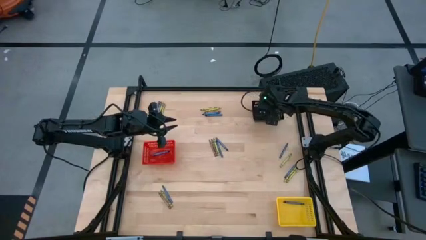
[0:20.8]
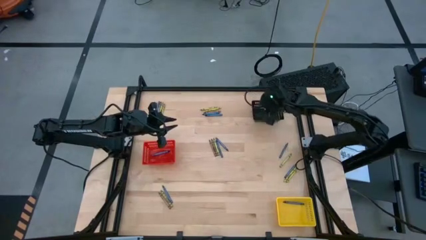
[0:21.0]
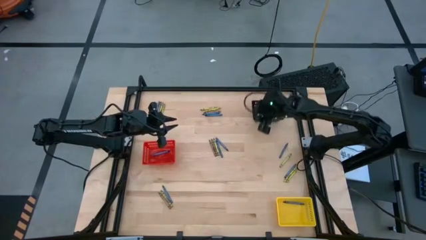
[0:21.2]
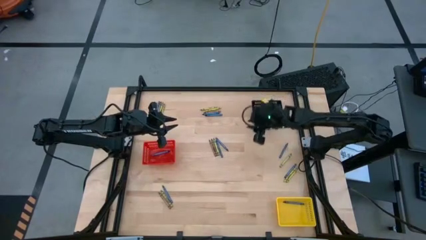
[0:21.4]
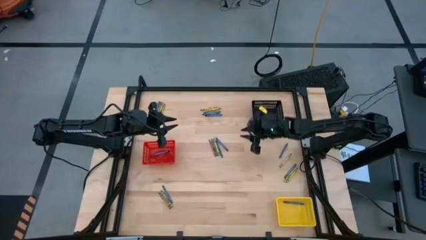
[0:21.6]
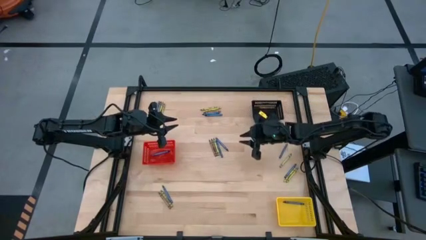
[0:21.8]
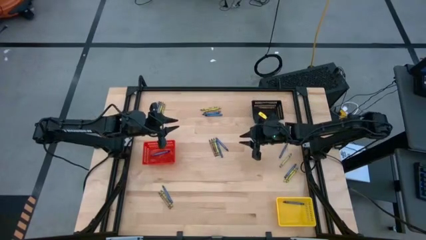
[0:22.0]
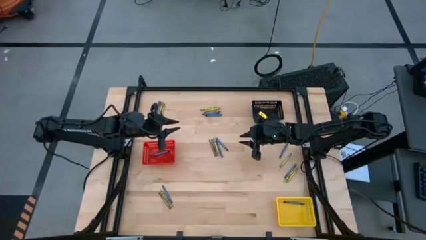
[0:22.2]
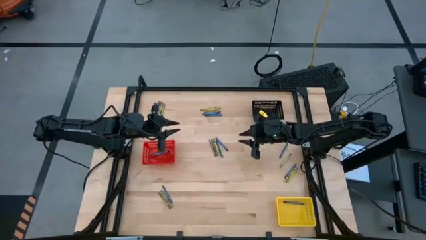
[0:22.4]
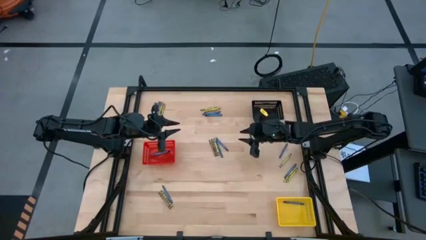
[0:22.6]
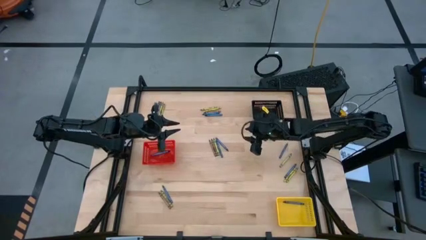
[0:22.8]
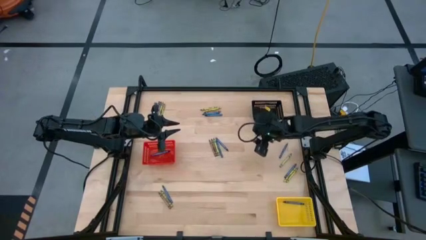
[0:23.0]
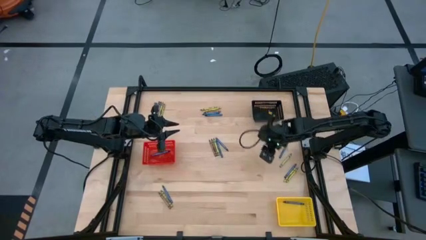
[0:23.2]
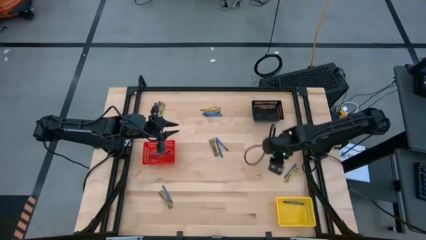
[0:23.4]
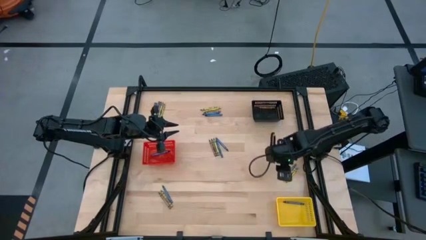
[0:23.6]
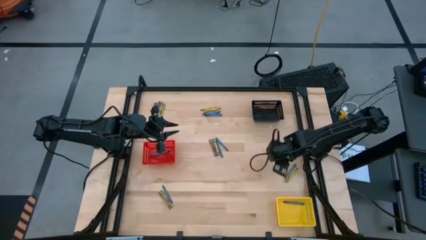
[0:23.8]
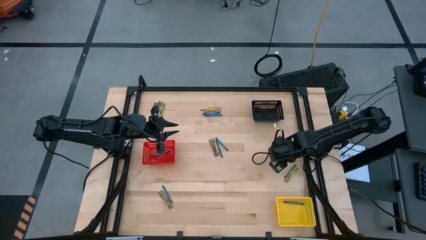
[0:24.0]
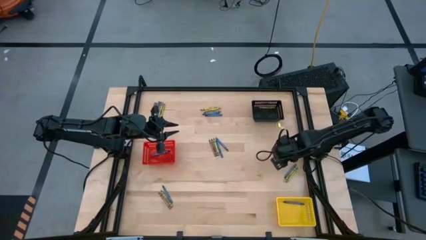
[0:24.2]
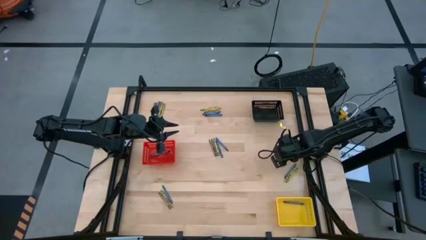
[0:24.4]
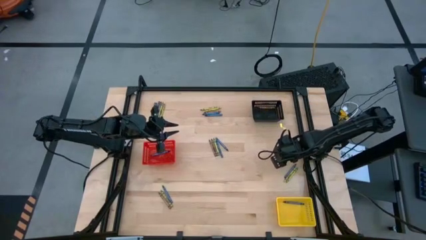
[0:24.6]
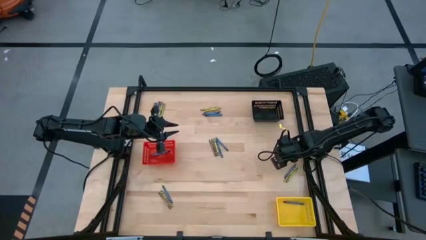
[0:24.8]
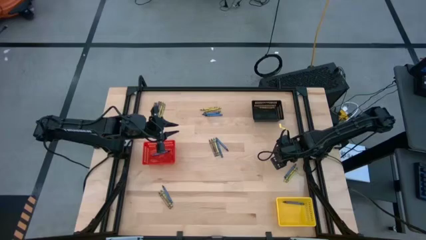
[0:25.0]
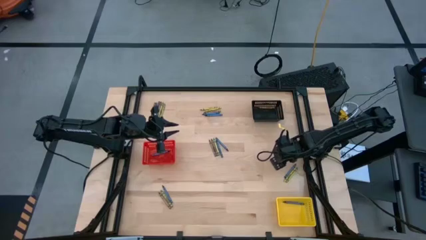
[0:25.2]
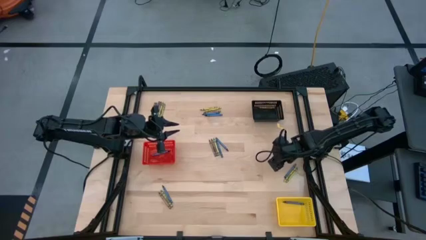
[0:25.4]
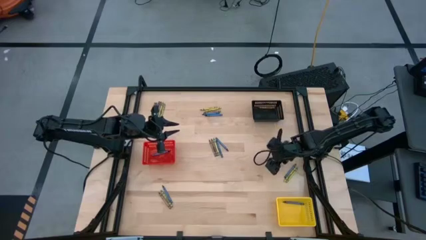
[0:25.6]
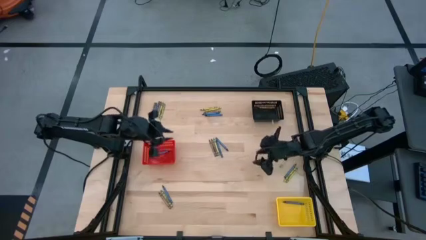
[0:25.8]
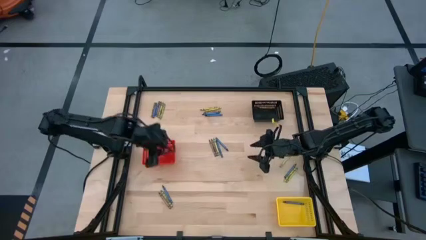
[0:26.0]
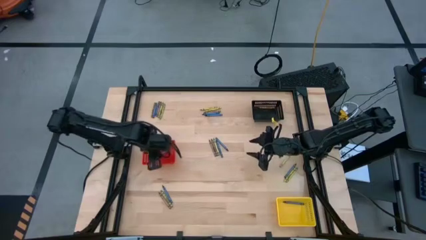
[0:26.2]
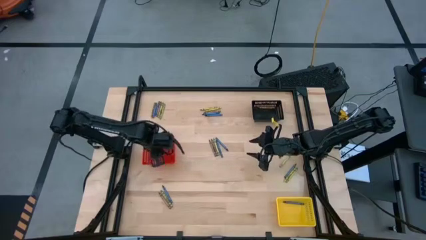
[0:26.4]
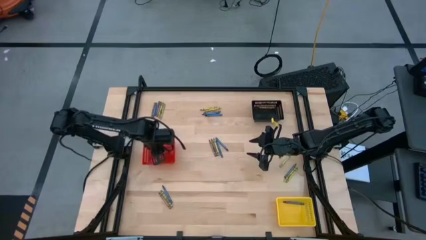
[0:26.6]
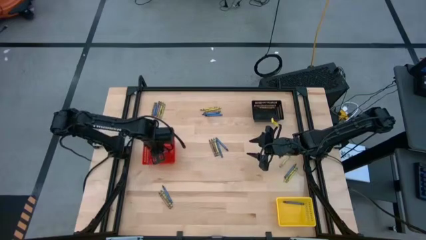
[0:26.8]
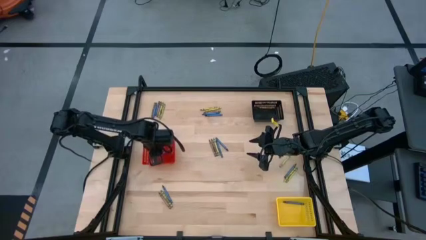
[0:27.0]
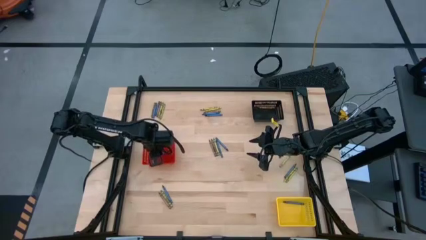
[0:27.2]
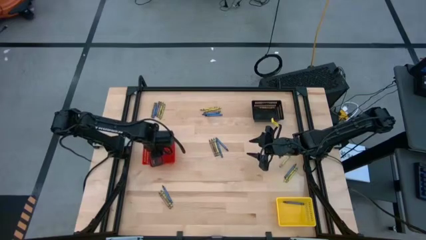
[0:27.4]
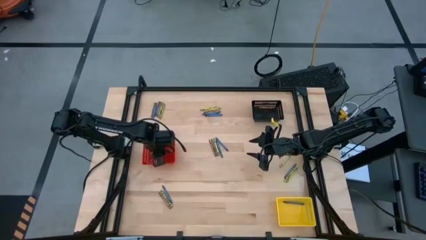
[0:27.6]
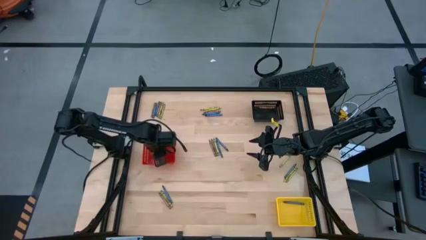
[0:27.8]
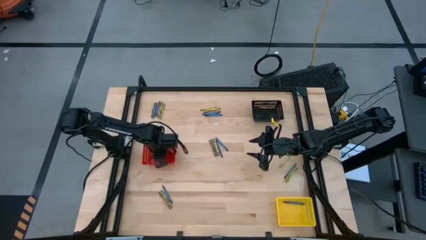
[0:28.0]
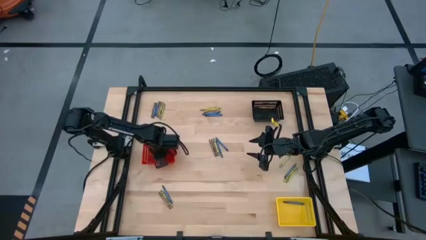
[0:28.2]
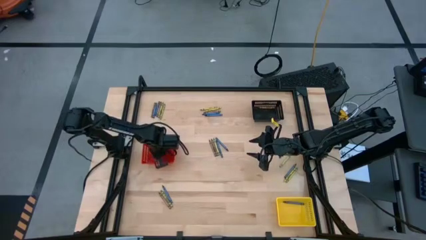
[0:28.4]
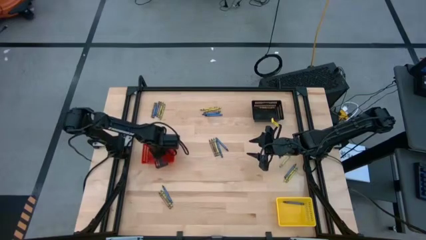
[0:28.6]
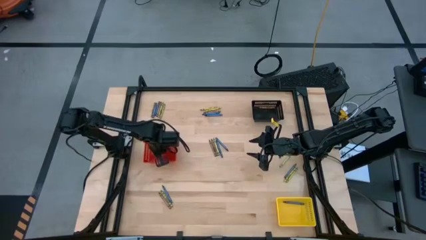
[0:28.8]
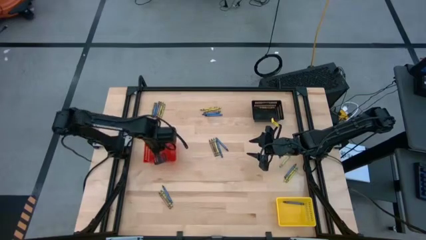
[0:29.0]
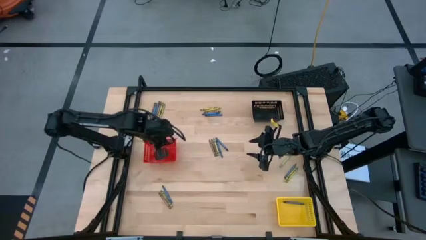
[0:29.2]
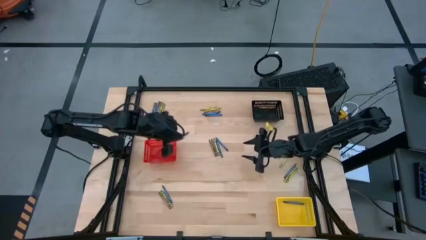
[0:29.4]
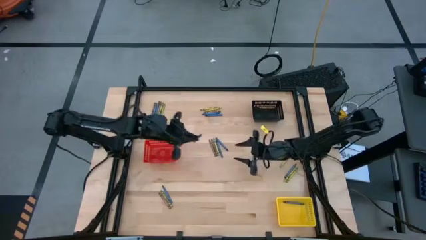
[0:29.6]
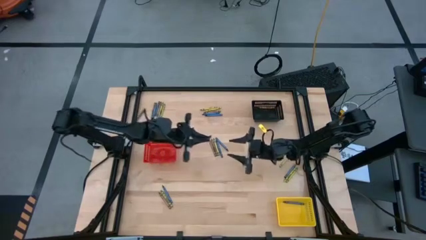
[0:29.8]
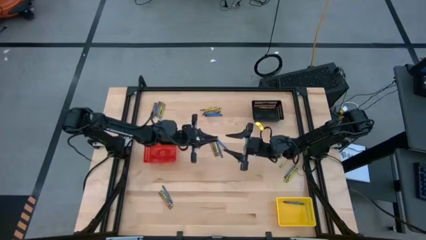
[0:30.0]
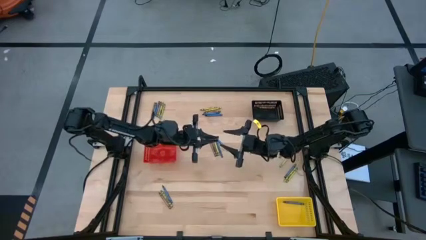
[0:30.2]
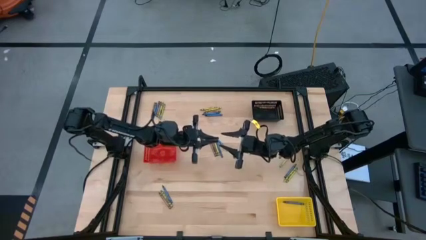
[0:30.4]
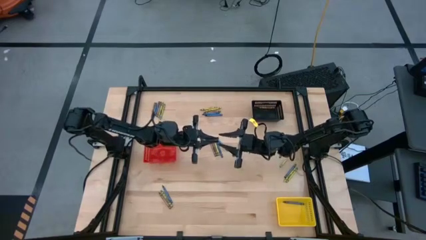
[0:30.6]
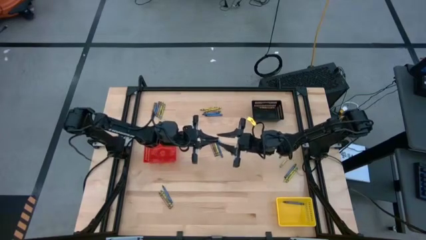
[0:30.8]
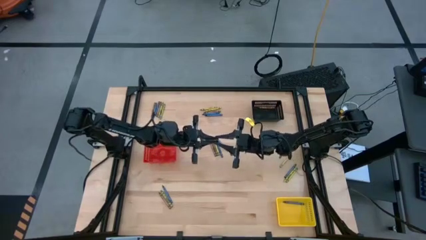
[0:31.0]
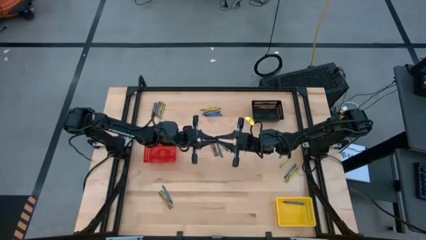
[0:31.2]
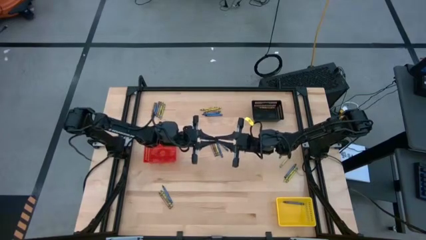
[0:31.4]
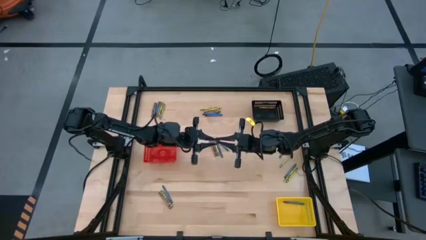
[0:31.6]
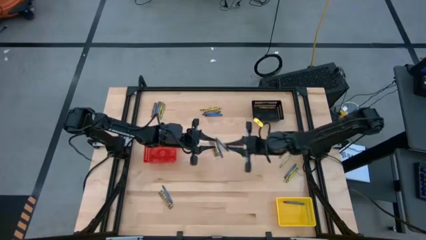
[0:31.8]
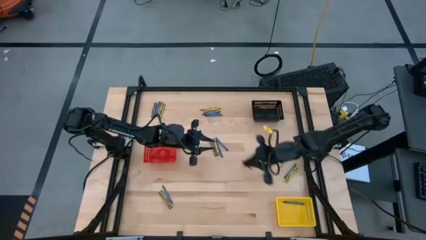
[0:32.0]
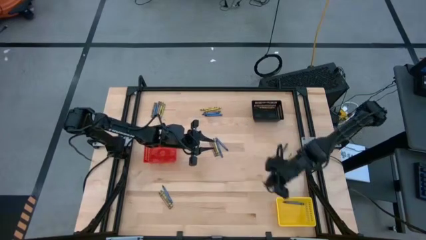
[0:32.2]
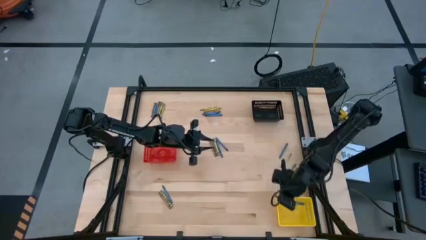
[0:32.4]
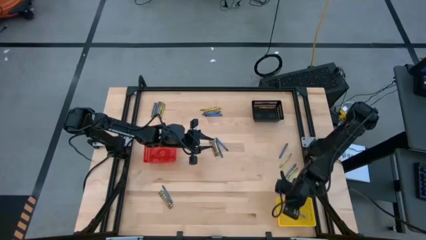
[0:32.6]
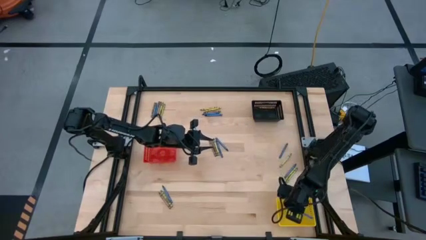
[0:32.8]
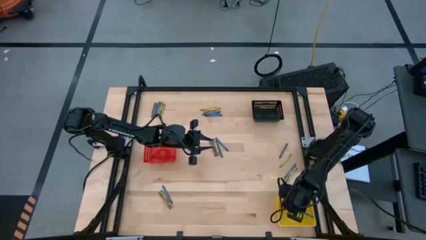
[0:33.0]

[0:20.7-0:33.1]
Task: Sort crayons
Put the blue crayon in the red bin into the yellow bin

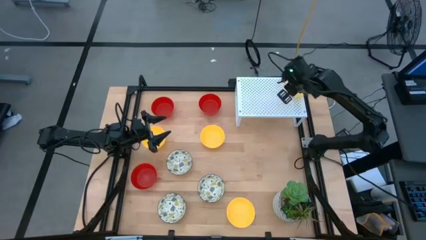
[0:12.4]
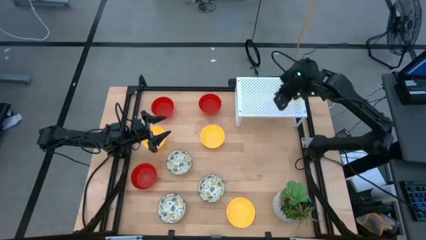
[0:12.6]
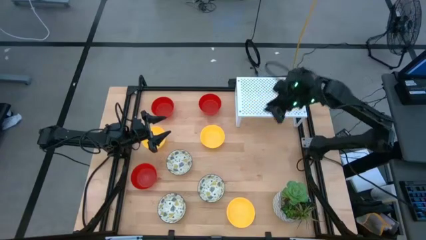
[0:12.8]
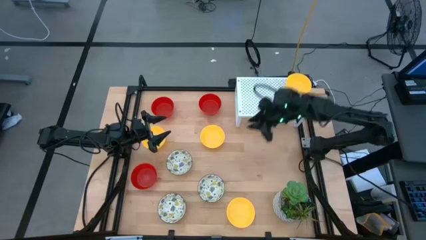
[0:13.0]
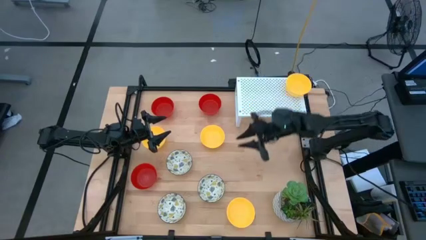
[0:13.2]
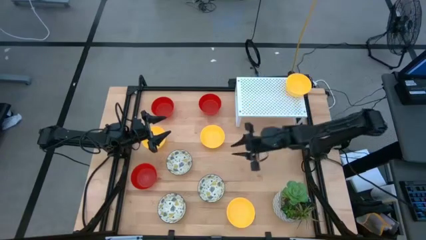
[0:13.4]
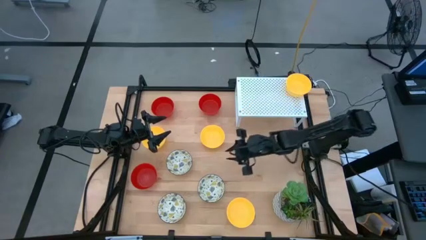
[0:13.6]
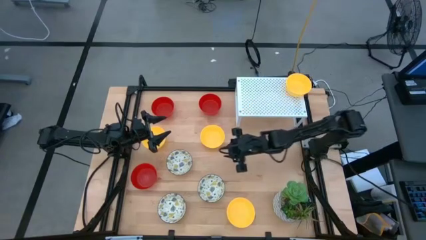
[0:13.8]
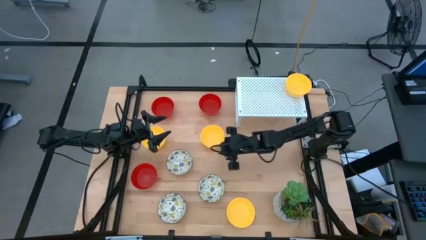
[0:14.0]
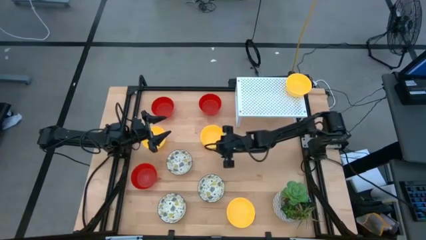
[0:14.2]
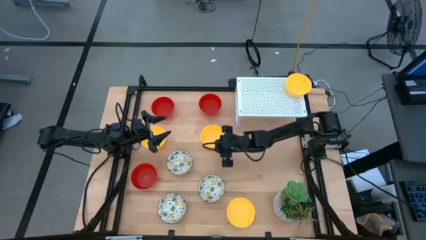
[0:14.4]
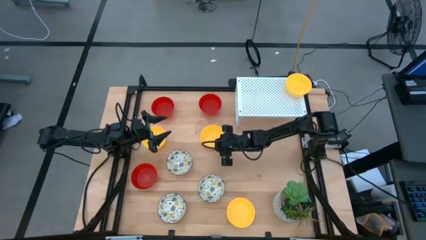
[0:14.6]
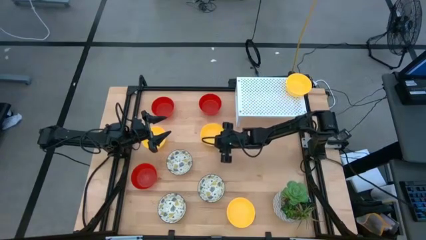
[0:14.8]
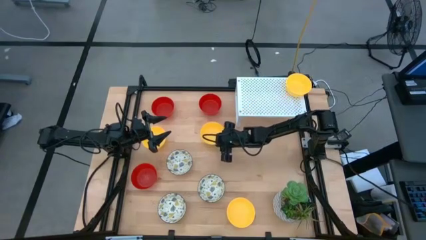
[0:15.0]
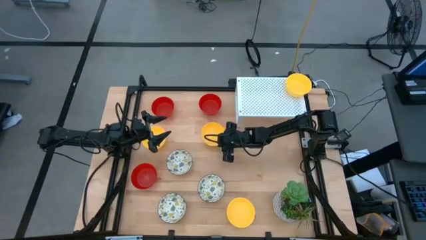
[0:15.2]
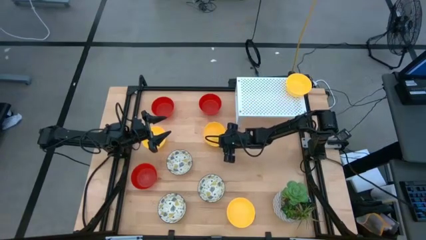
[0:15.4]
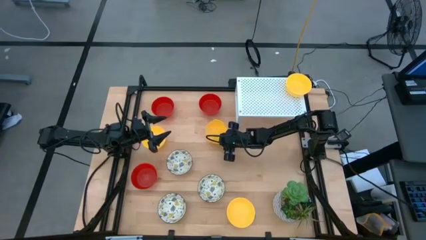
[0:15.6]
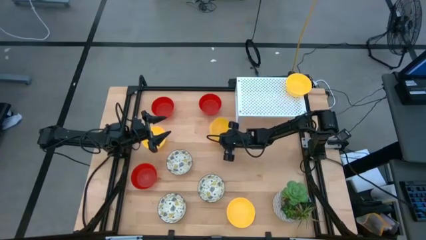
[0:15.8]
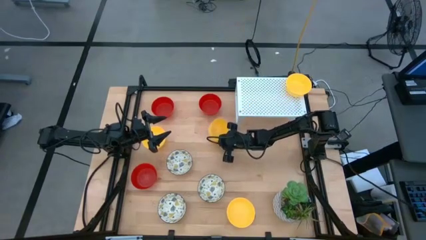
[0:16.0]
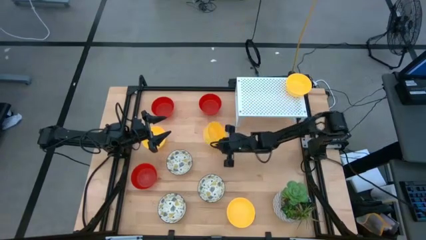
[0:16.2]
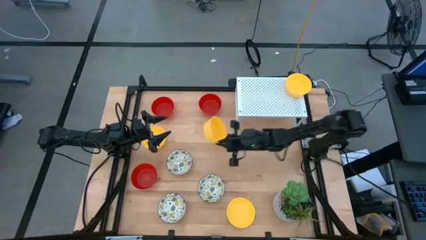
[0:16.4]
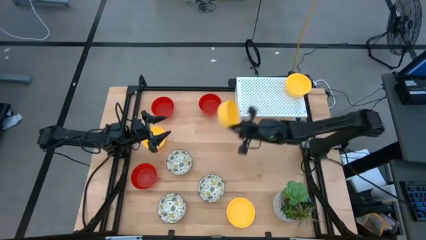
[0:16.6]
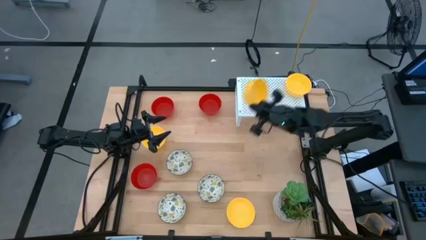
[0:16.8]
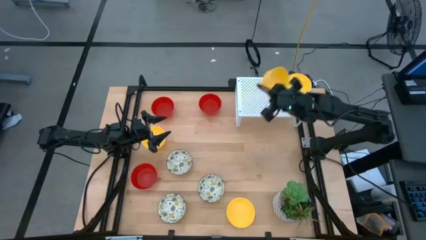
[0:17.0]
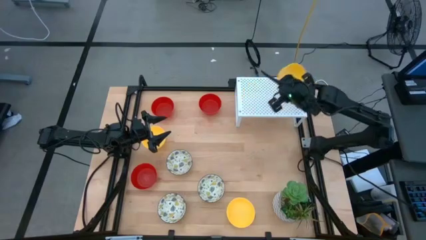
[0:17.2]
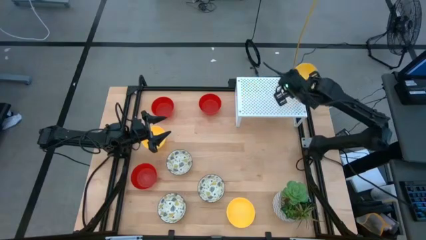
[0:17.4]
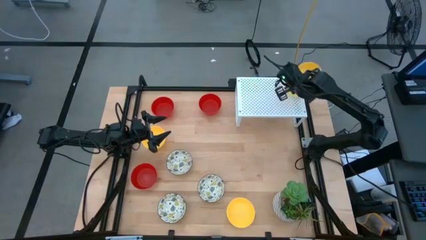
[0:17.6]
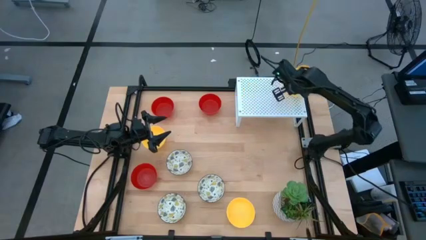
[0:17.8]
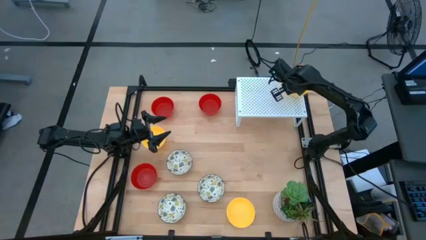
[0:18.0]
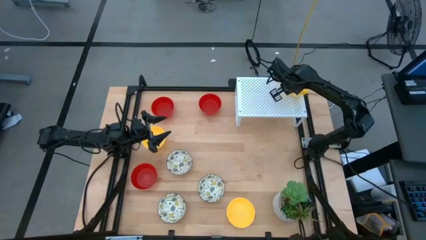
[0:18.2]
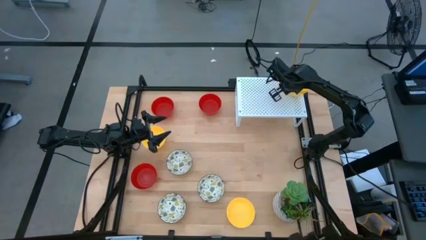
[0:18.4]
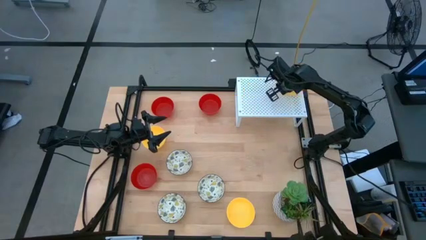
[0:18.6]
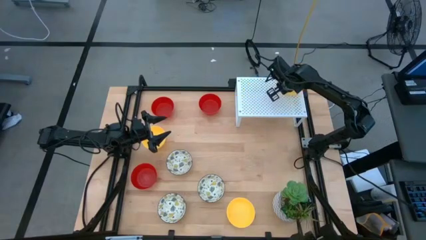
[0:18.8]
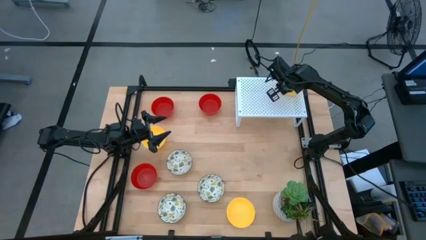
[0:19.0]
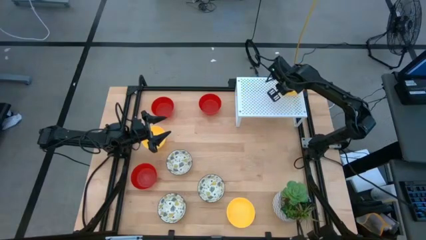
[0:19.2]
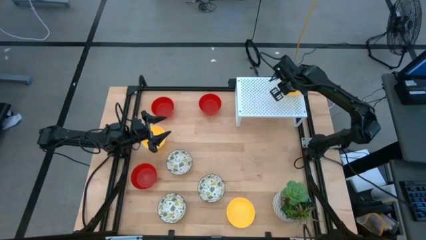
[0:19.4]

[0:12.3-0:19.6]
Task: Pick & Place Mini bowls
Stack the yellow bowl on top of the yellow bowl on the shelf
